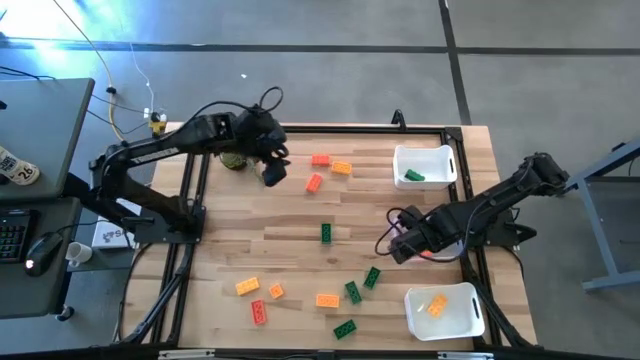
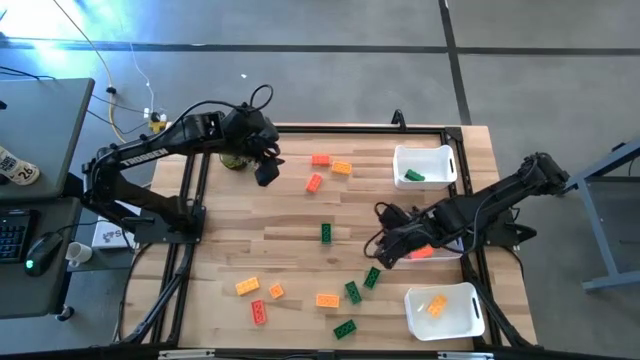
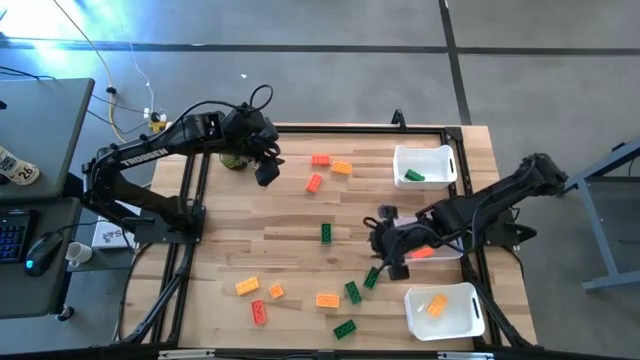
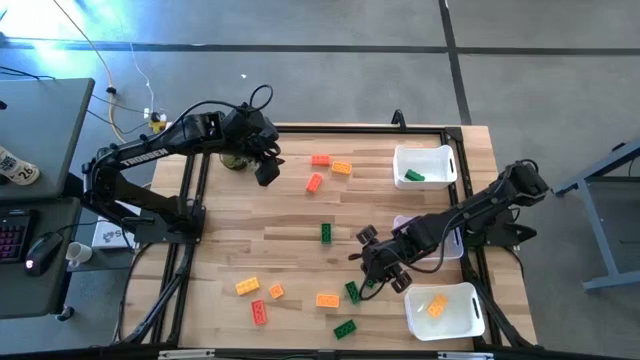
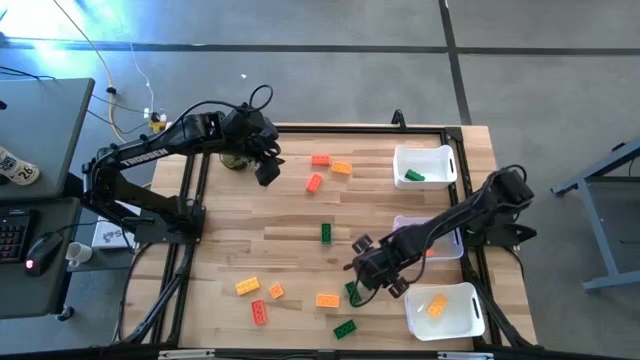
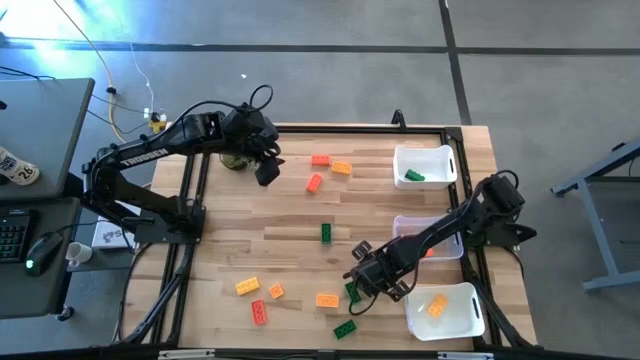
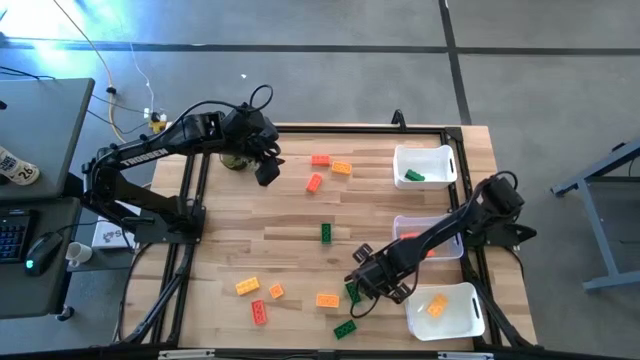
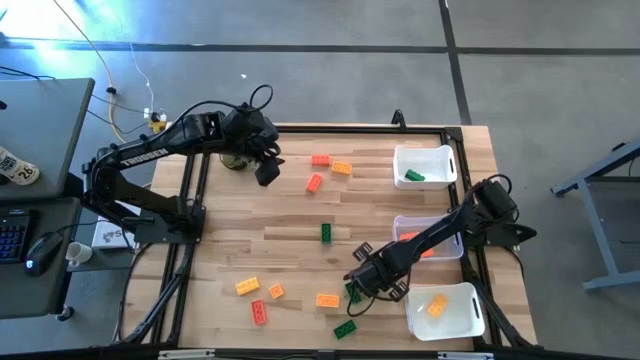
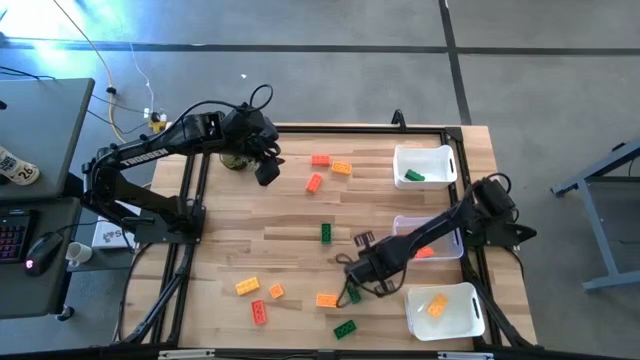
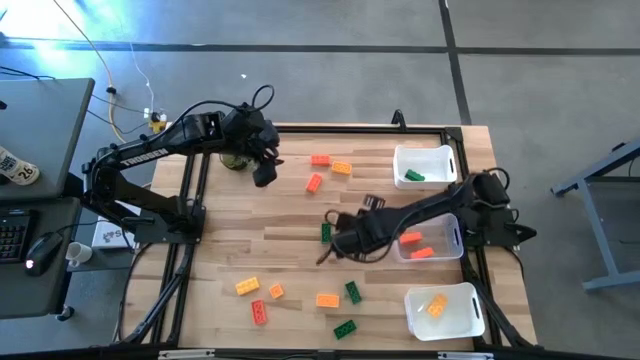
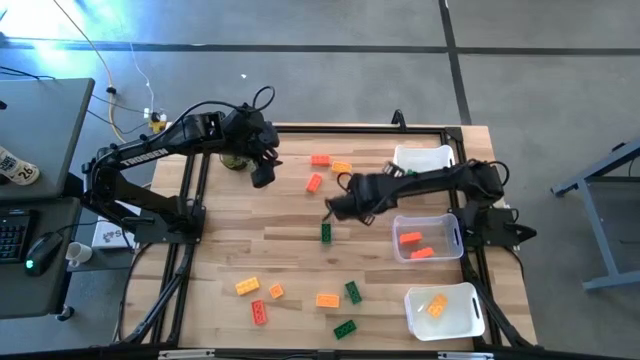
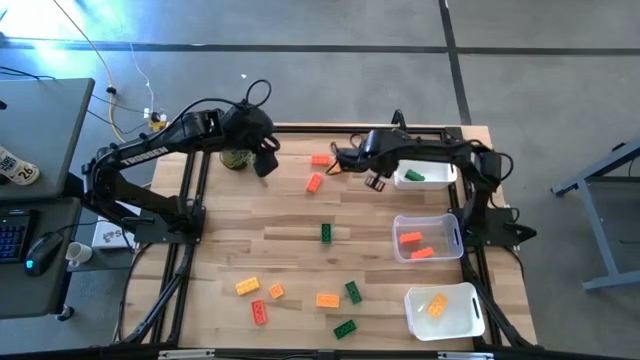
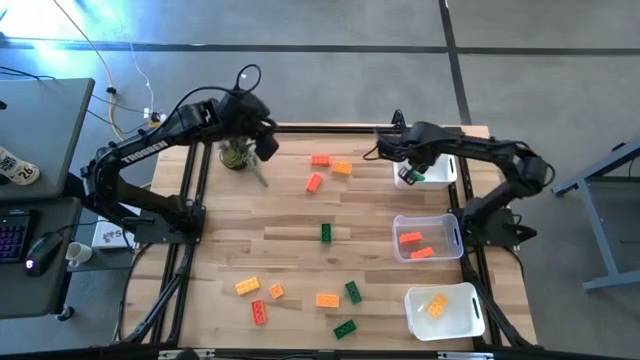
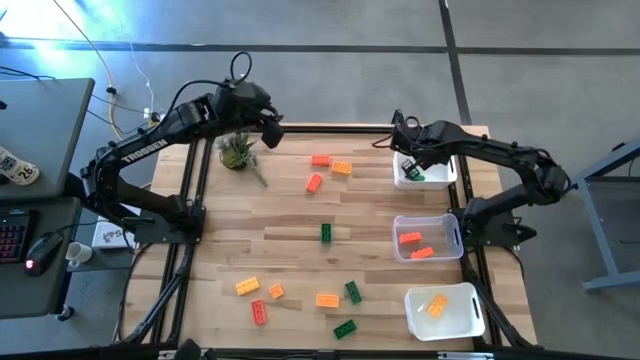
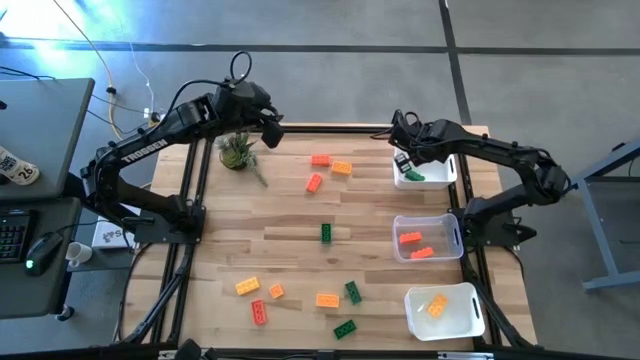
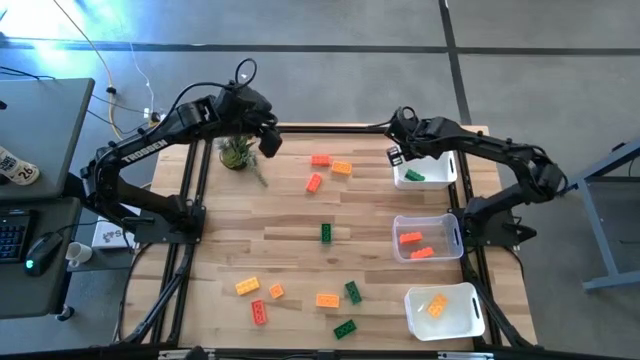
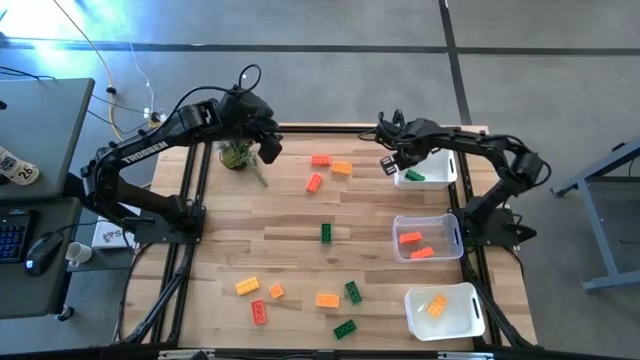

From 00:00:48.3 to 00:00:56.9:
Task: Sort & place blocks by color
Put the green game piece into the top white bin

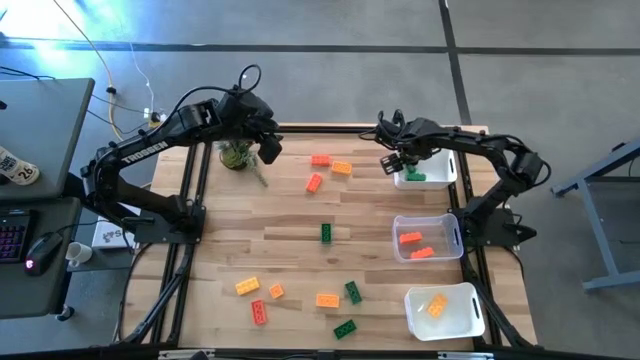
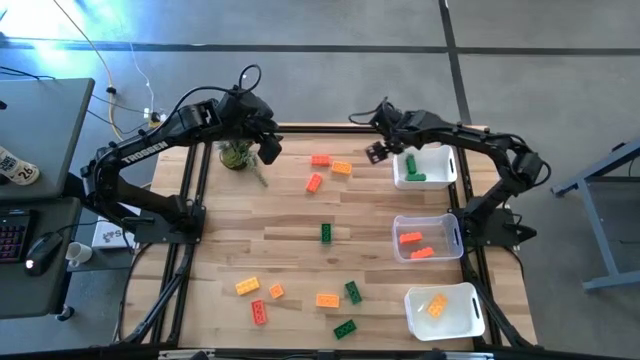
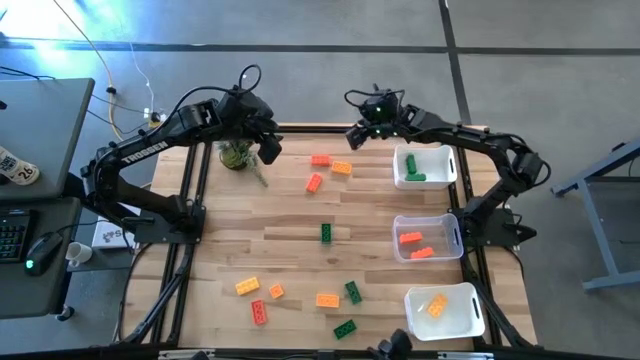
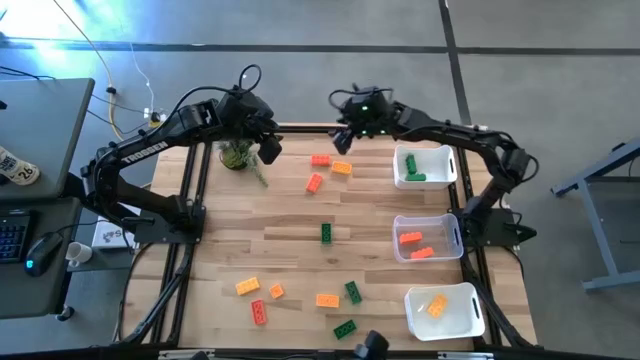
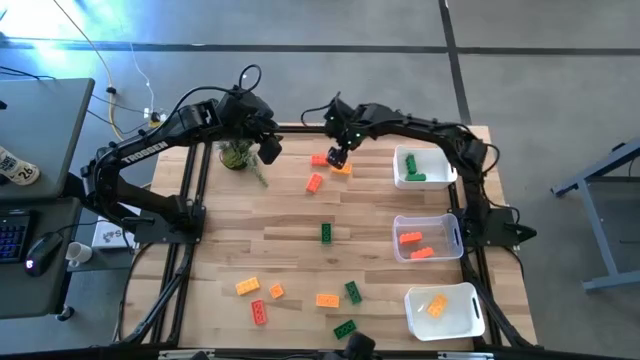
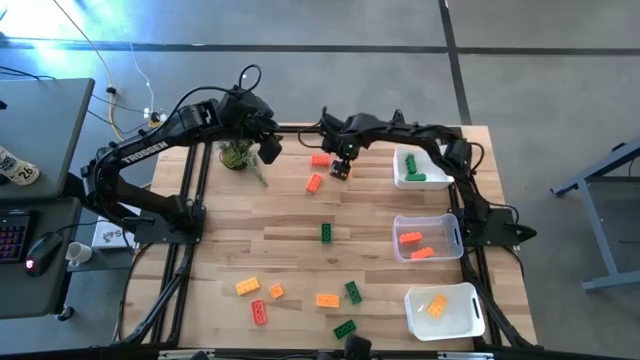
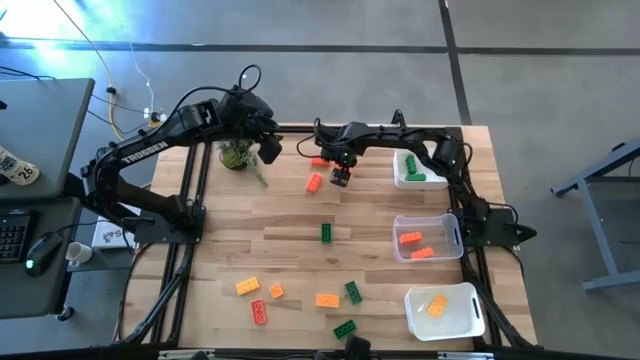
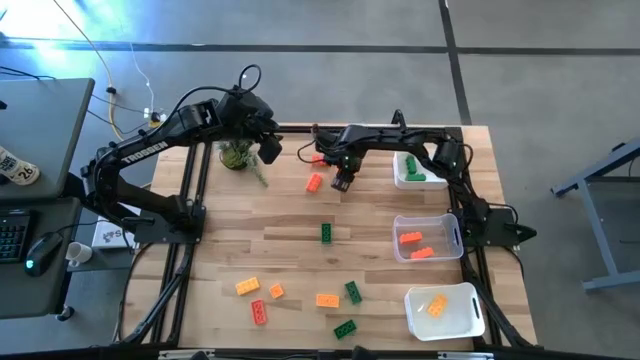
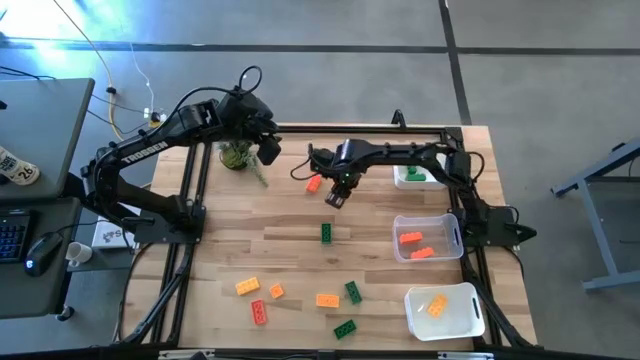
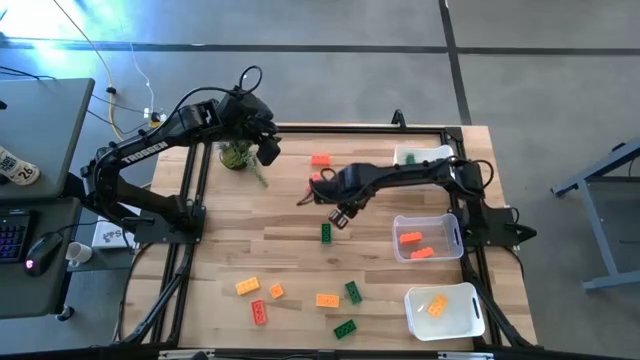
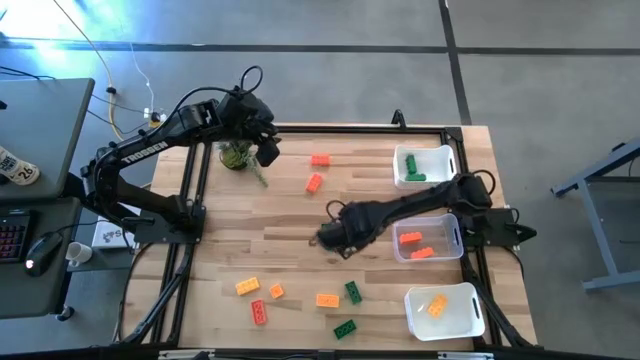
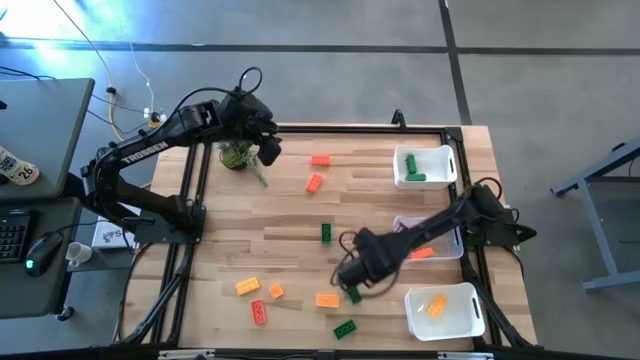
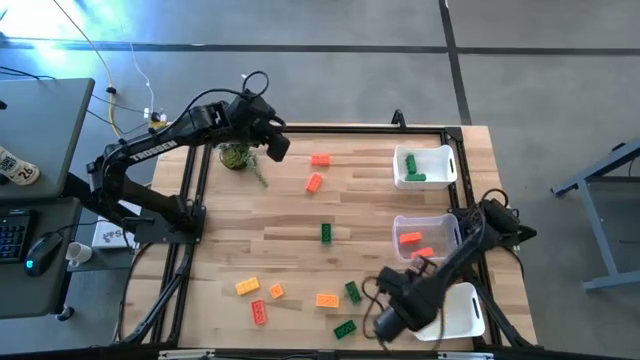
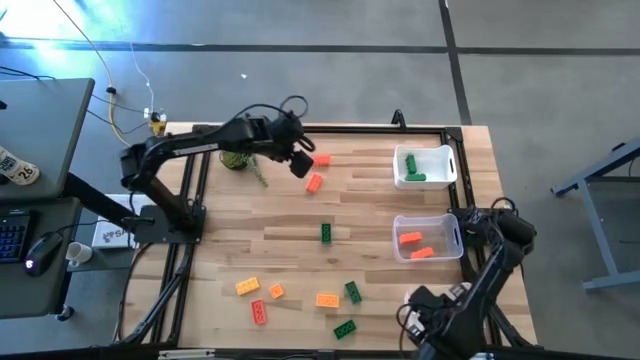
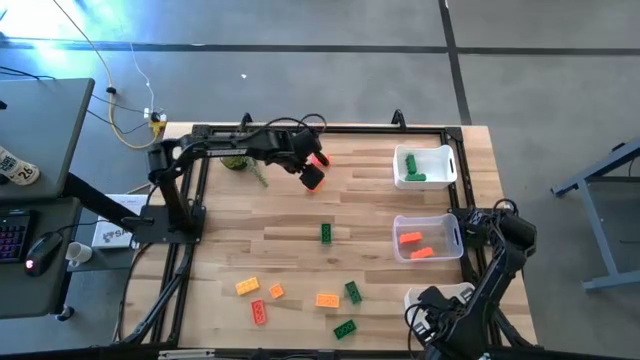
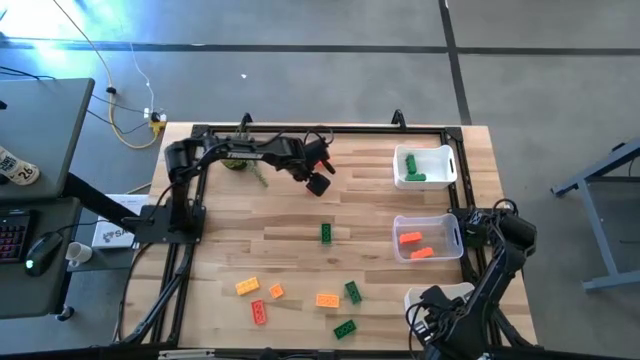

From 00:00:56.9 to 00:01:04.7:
Put the yellow game piece into the bottom white bin

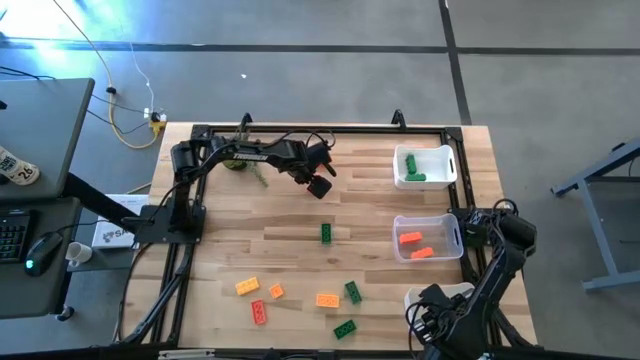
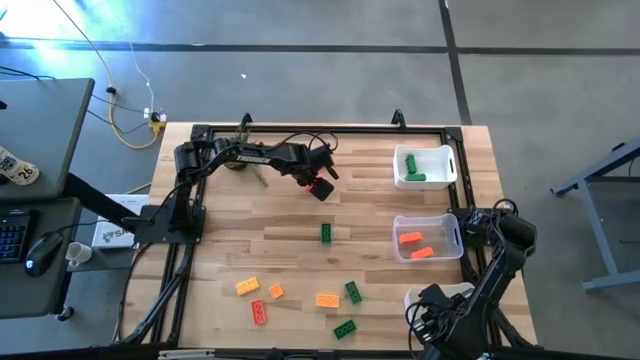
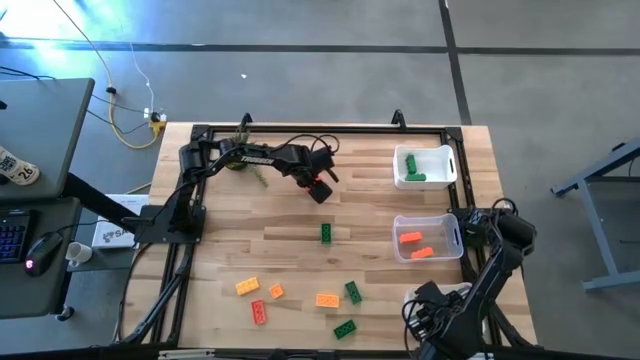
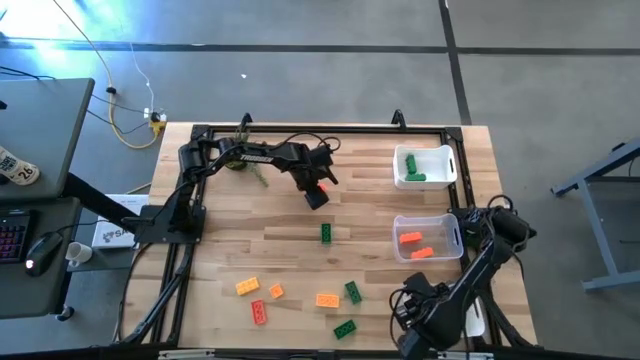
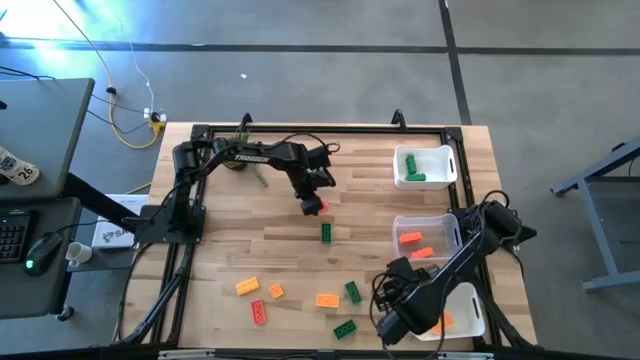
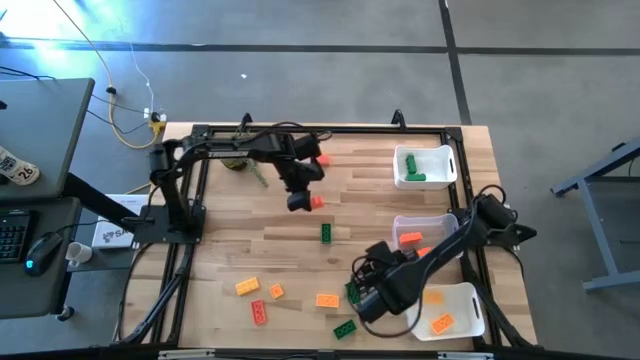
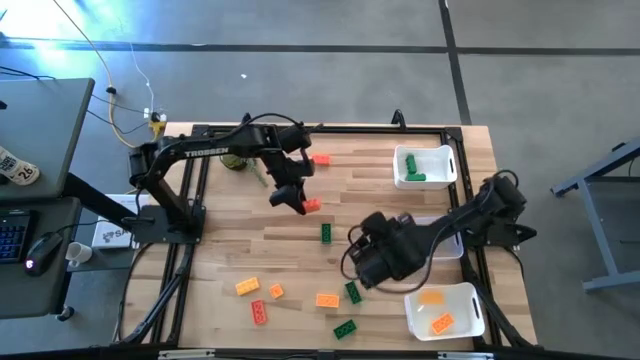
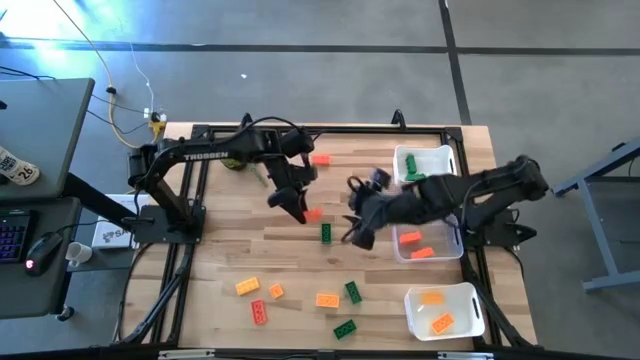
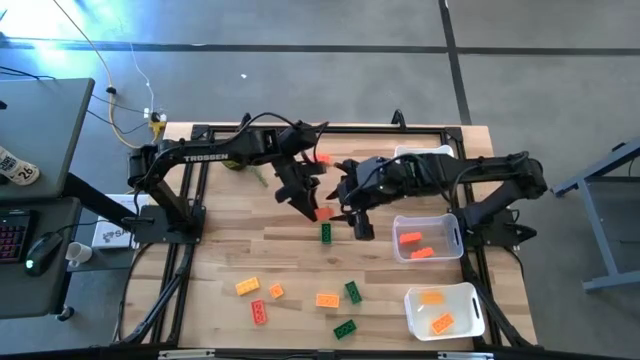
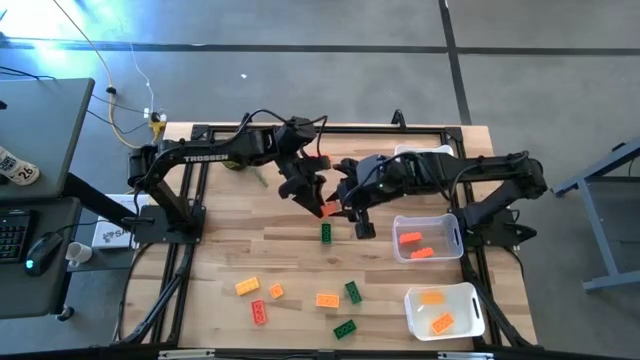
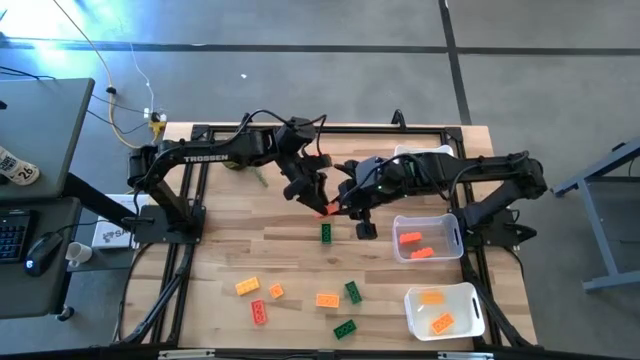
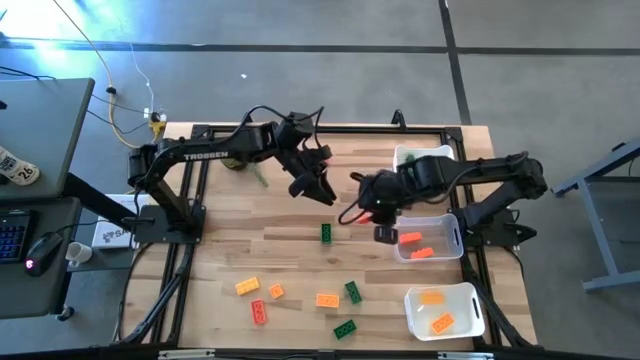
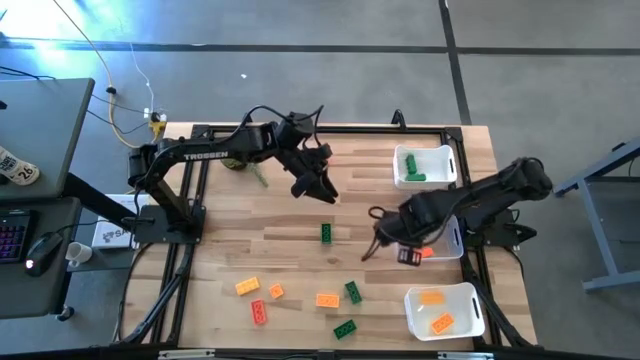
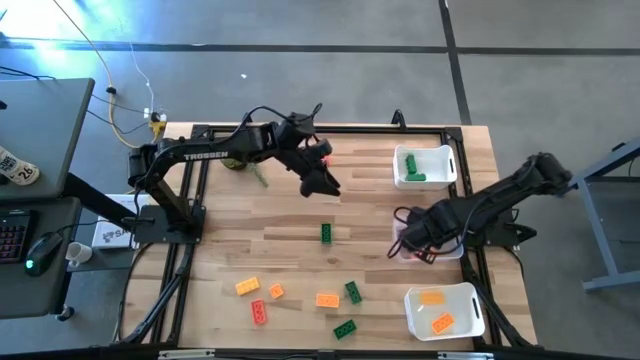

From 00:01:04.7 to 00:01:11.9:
Put the orange game piece into the transparent bin
